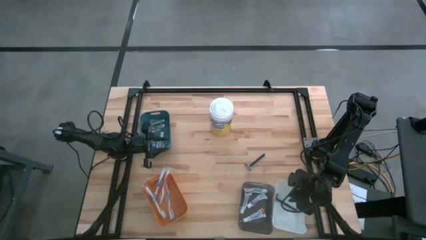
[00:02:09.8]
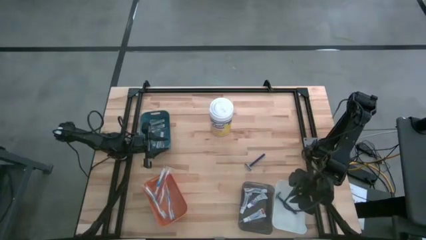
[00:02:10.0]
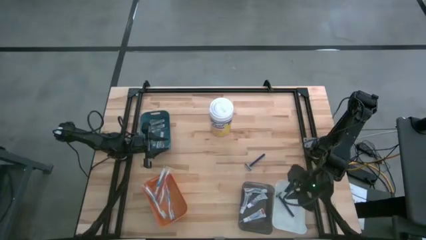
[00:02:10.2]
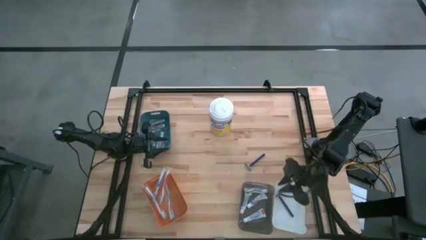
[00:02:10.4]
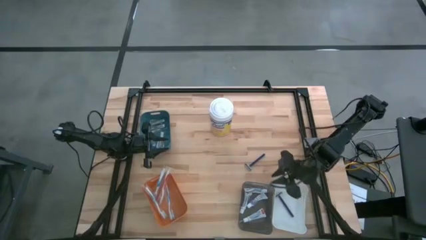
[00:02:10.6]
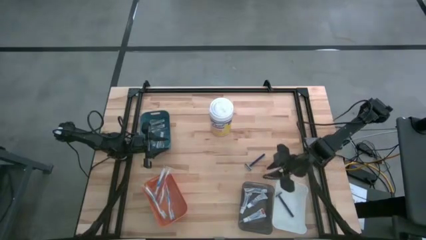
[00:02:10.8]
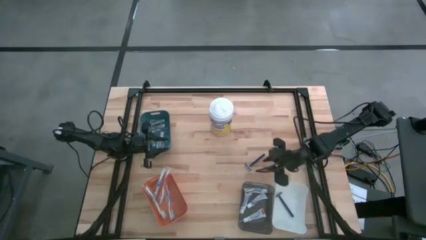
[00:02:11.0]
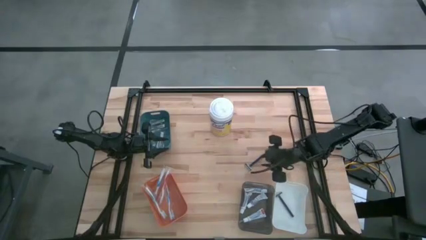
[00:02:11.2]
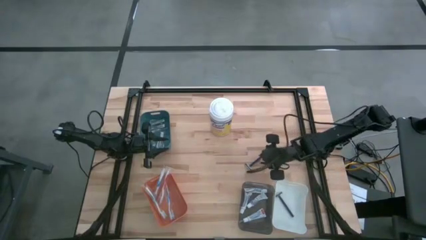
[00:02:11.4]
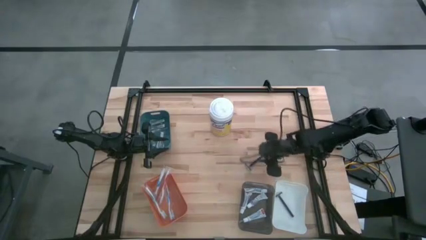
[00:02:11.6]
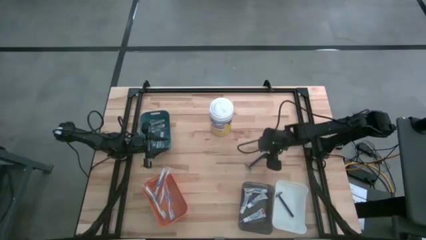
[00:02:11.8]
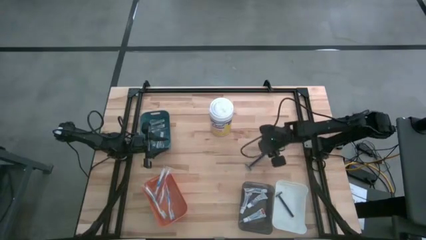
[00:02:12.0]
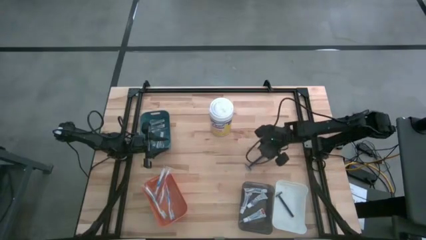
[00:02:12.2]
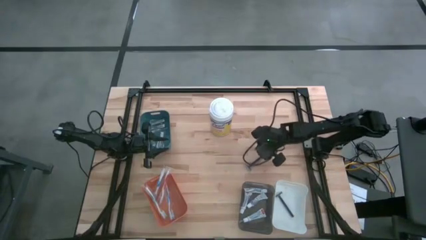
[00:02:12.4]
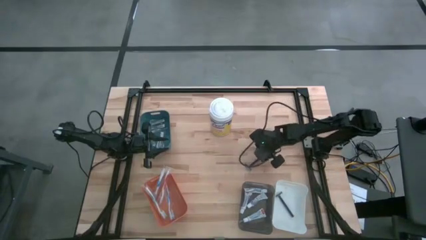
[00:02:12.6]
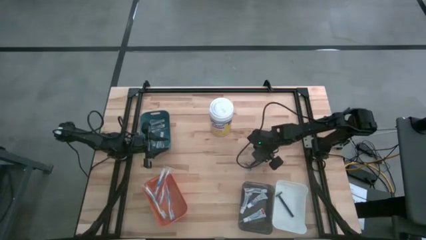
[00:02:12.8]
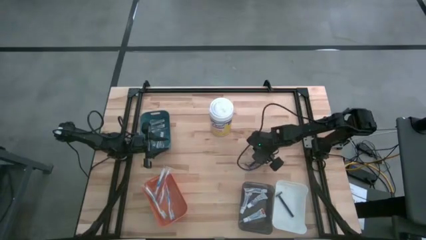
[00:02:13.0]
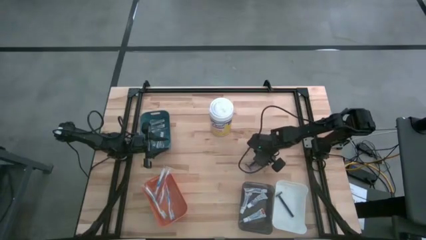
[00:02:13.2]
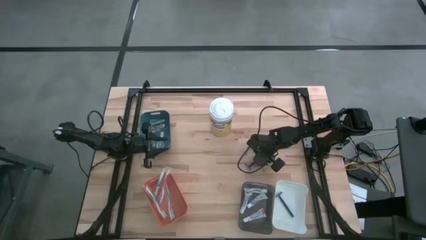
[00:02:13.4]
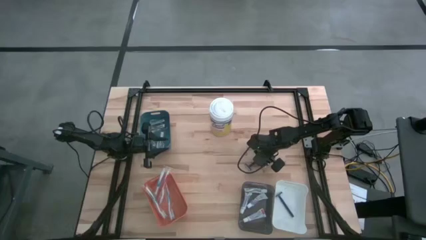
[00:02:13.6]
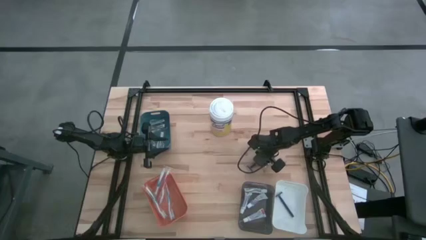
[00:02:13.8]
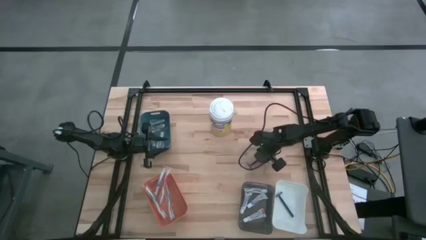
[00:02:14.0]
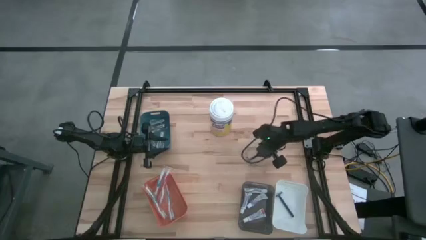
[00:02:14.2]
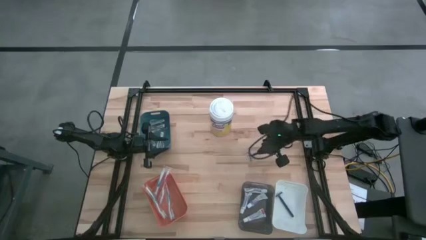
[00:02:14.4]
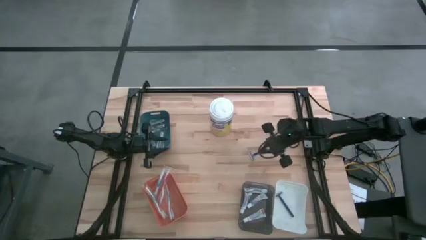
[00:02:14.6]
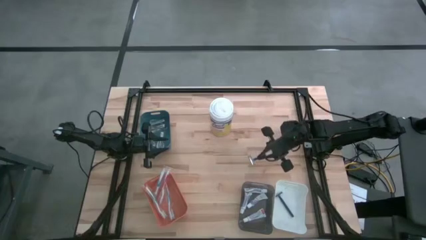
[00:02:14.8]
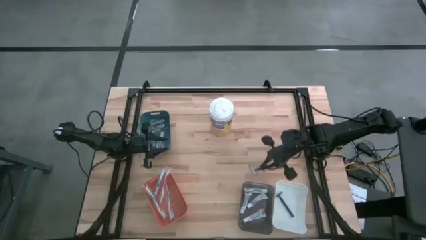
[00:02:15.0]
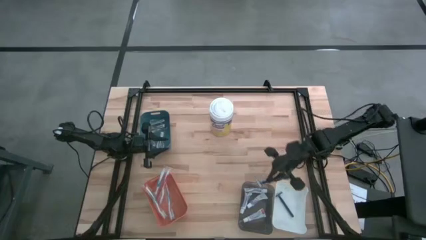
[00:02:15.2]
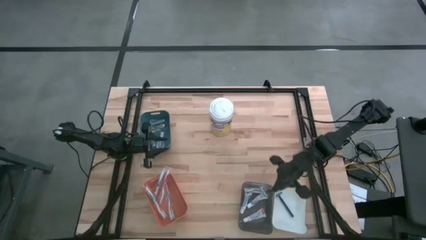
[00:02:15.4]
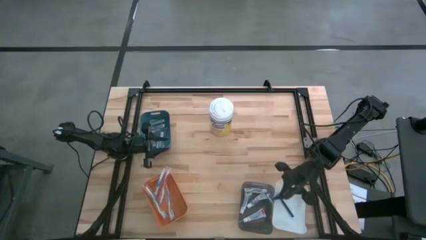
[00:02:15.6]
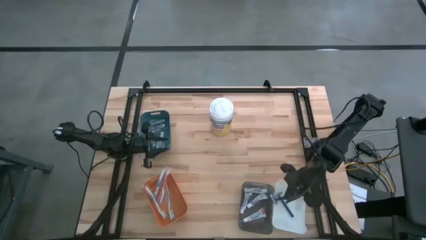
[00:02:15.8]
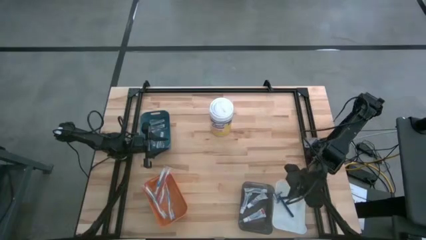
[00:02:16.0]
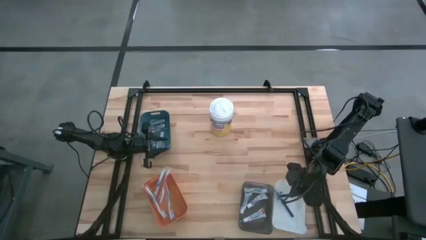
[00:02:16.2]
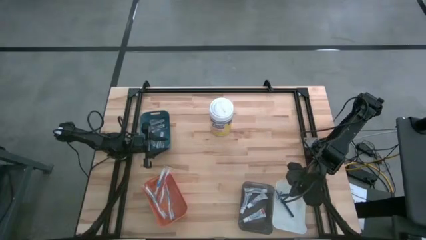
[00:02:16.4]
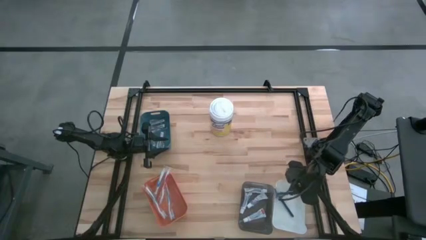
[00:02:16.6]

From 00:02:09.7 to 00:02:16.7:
Task: Pick & Place Travel size toiletries
Put the blue razor into the white bin

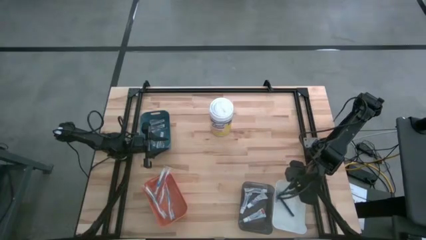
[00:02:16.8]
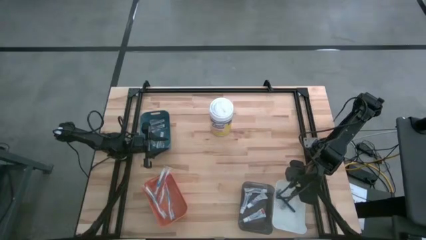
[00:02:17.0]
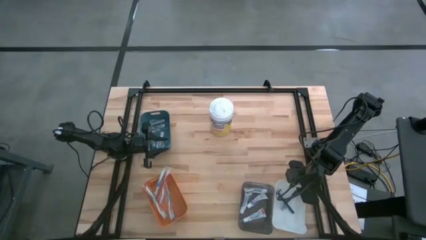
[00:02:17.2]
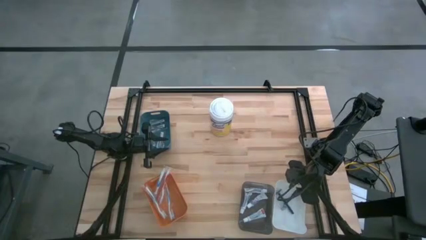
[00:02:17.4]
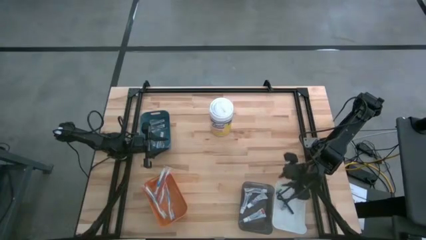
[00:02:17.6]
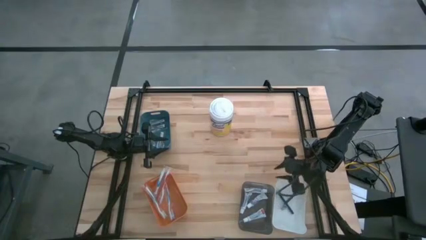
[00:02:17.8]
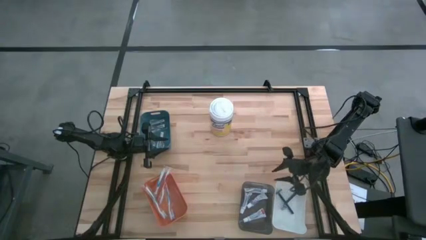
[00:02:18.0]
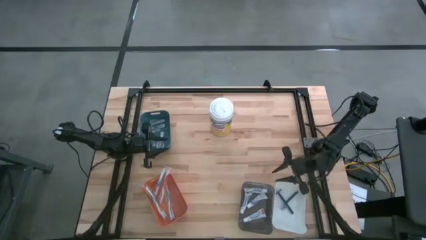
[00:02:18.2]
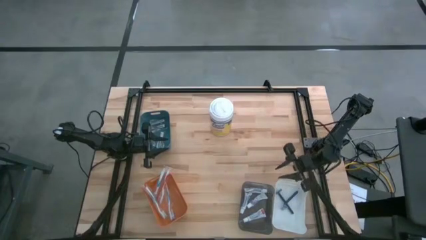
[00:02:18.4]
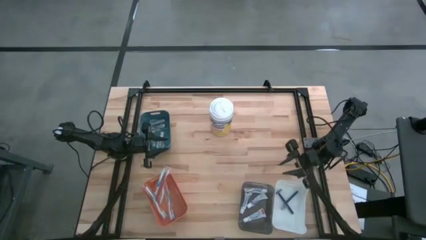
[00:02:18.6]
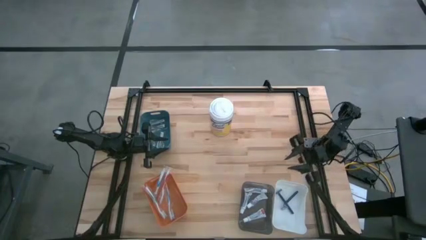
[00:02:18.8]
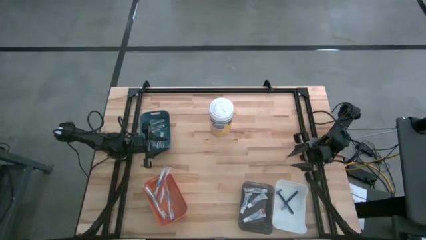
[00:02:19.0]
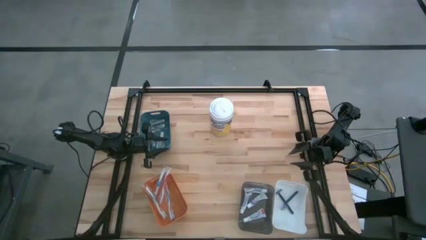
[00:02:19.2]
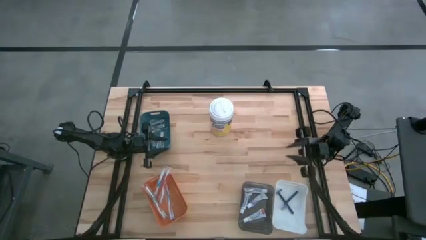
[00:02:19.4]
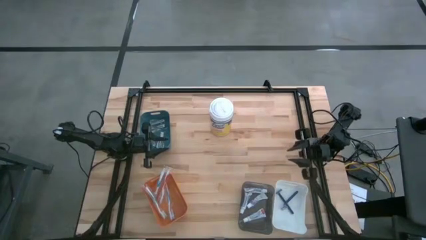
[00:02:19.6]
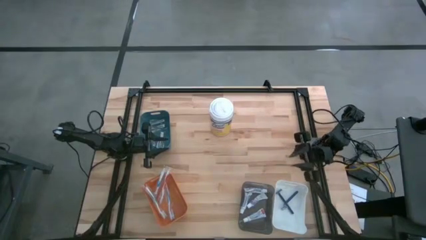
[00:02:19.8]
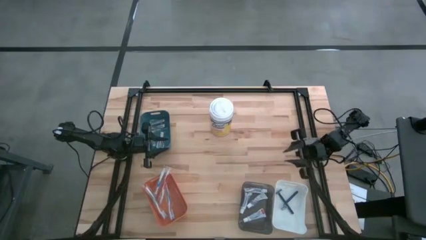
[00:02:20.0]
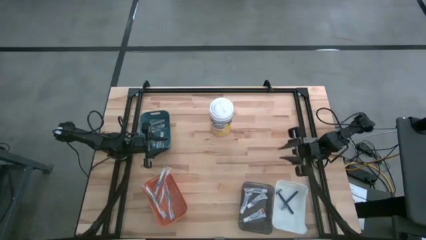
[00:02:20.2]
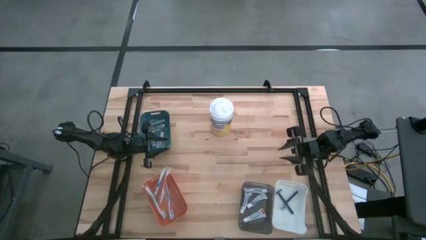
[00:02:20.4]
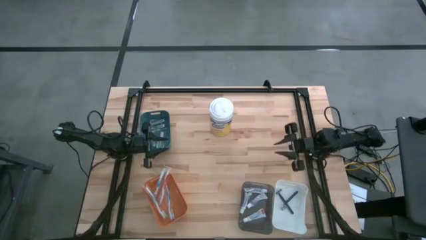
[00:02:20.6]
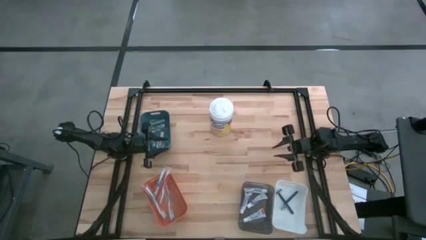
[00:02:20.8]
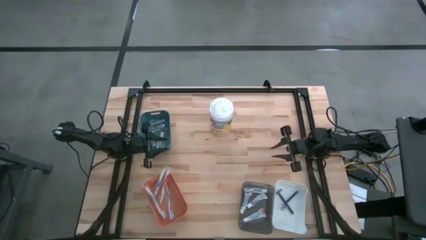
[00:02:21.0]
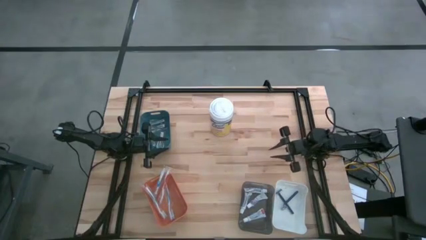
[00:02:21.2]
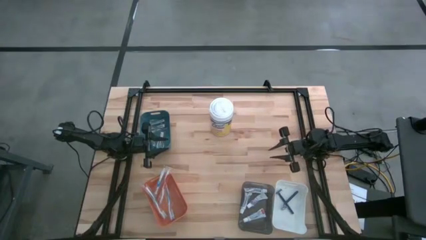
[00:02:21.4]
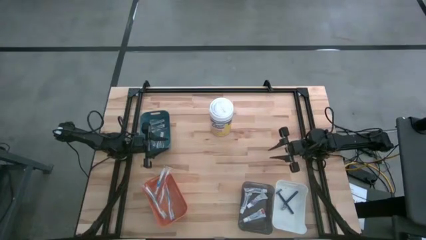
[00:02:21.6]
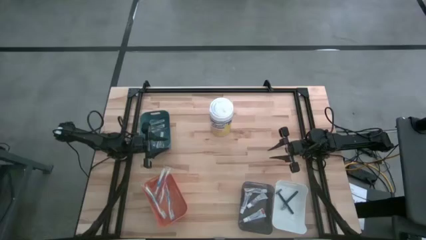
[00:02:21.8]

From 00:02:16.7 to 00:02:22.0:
Return to Home Position

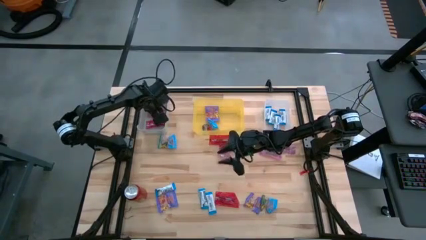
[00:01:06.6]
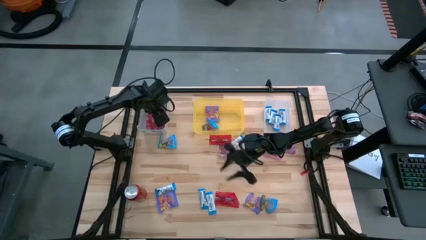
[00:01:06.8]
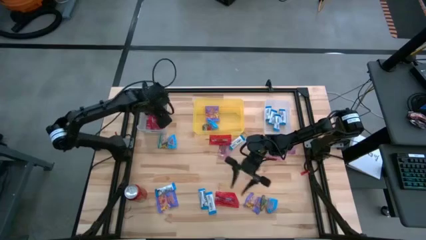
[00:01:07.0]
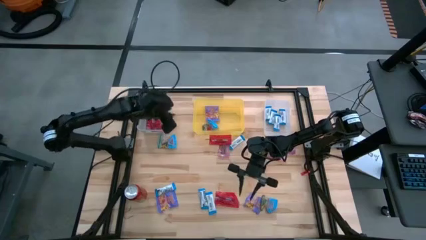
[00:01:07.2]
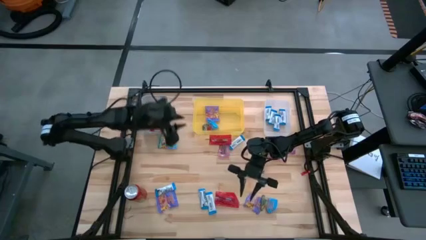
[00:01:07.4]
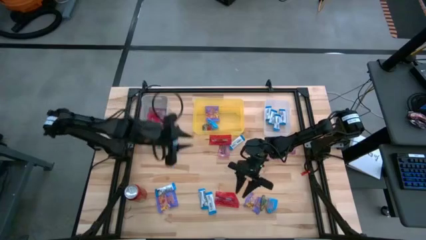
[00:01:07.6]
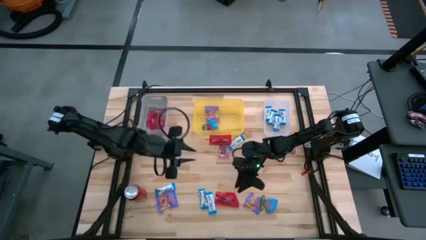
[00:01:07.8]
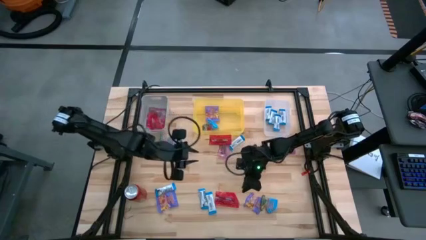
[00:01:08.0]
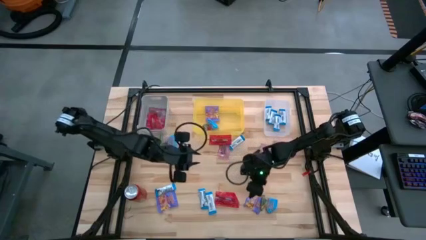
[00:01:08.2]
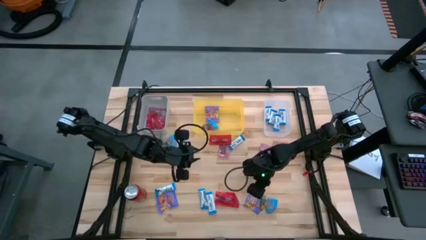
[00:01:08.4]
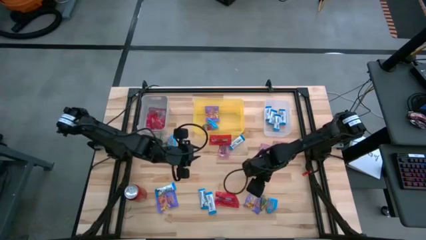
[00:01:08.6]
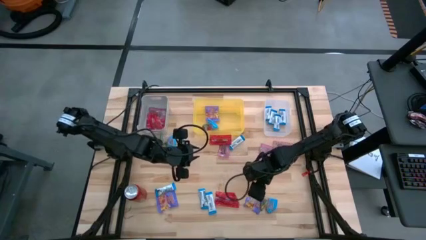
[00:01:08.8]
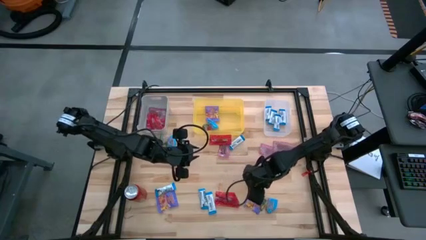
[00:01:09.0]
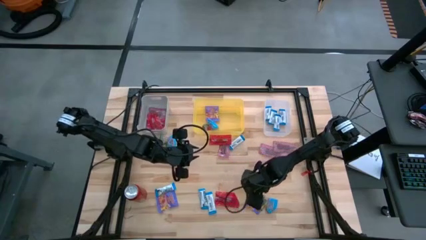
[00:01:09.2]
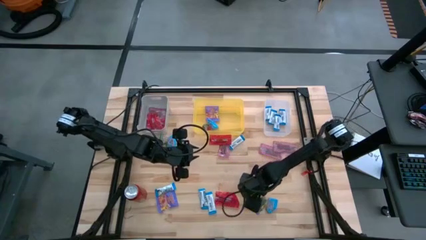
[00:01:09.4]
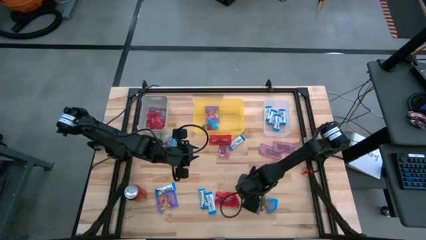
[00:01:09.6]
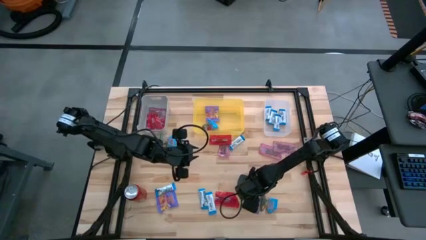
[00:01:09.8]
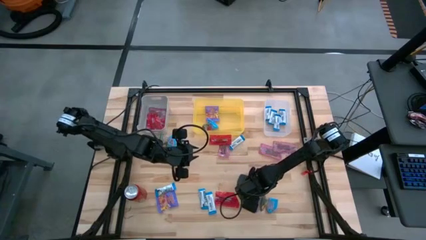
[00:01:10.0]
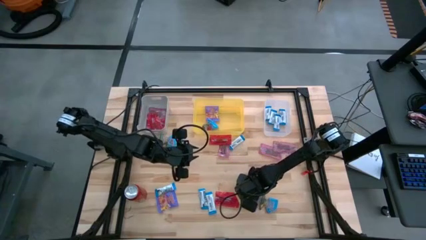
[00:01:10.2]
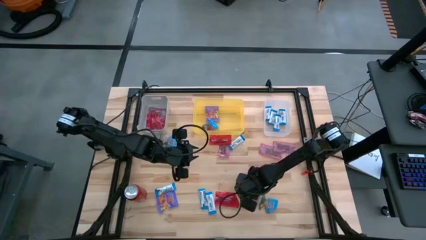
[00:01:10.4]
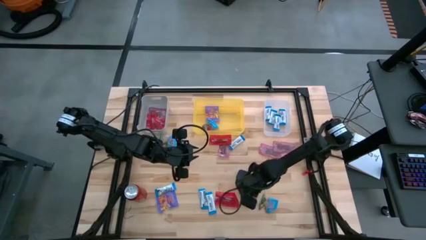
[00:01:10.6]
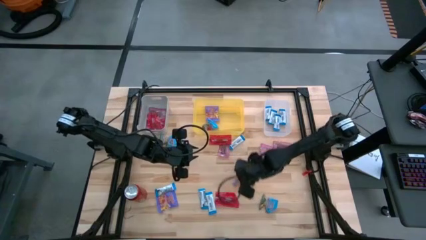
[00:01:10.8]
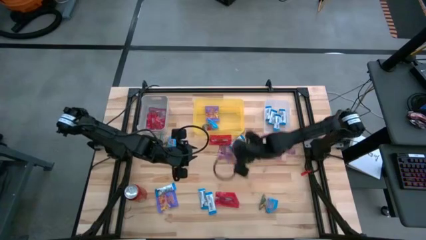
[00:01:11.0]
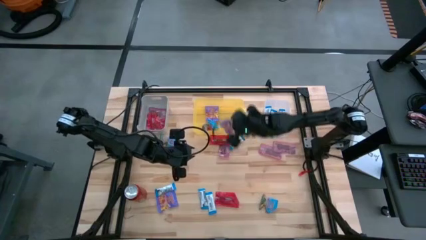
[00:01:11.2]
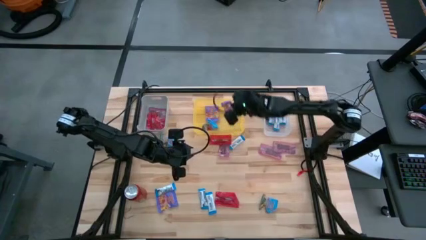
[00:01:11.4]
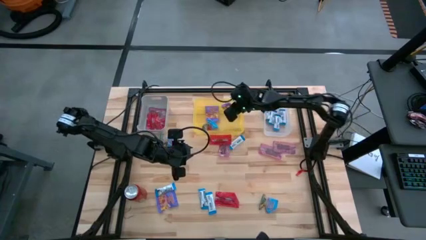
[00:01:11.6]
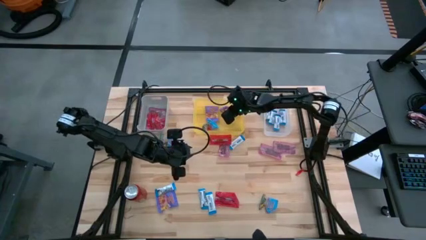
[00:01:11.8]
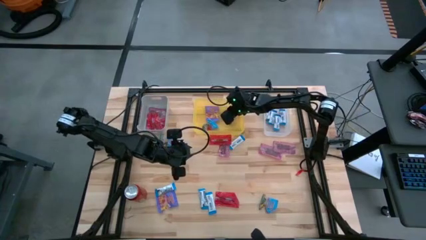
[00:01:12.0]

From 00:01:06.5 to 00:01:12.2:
Task: Sort candy
Put the violet gummy into the yellow bin
